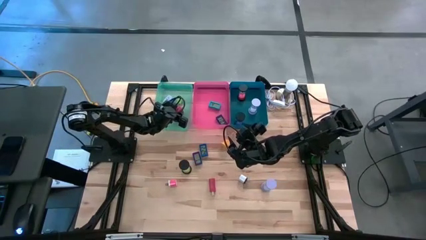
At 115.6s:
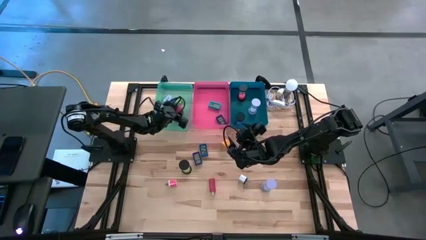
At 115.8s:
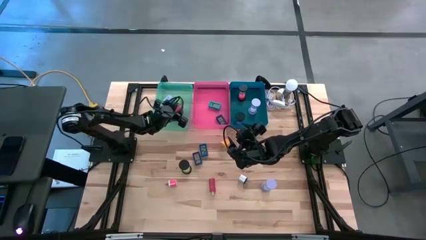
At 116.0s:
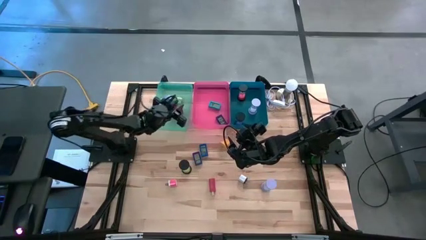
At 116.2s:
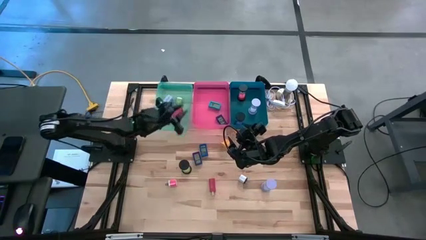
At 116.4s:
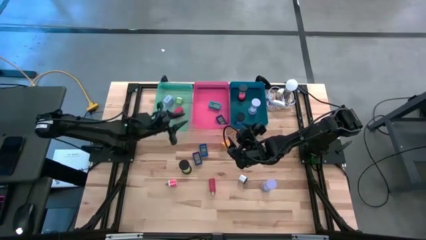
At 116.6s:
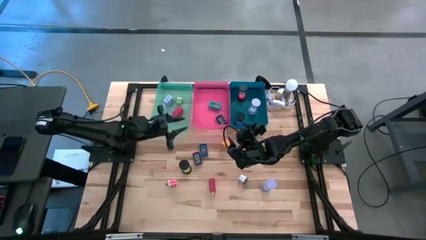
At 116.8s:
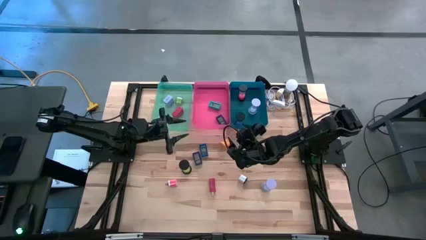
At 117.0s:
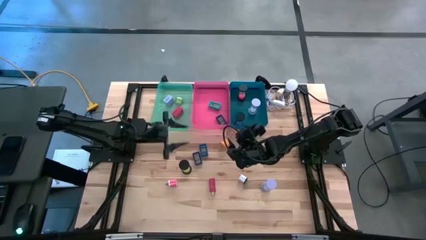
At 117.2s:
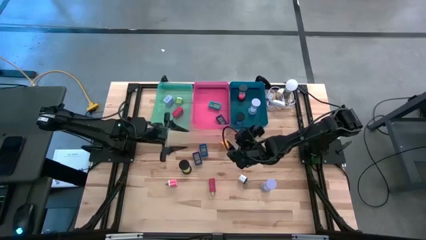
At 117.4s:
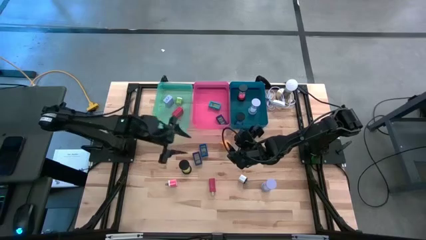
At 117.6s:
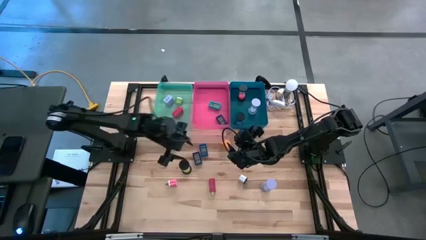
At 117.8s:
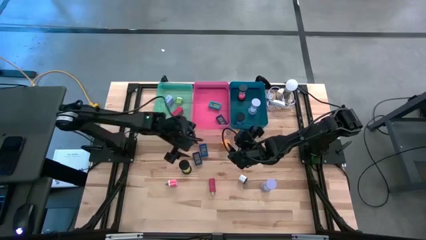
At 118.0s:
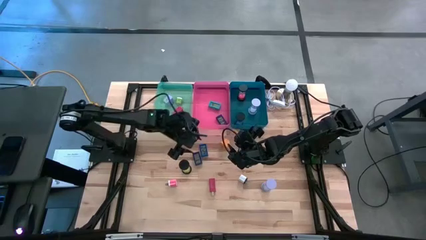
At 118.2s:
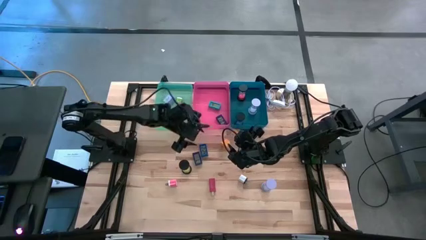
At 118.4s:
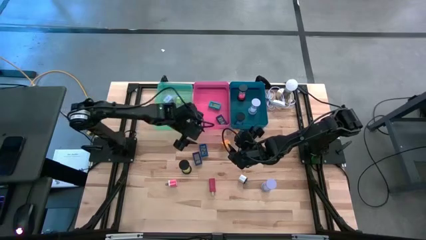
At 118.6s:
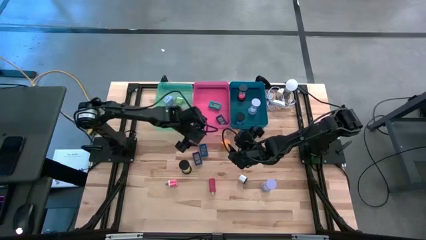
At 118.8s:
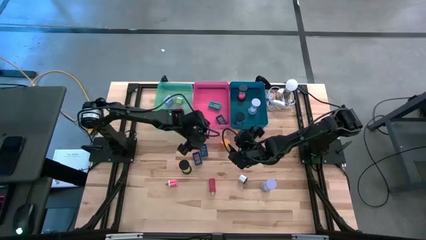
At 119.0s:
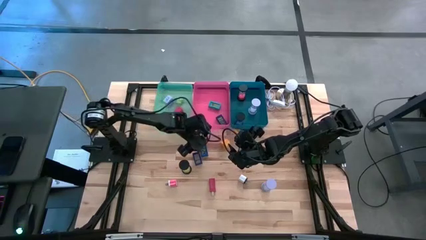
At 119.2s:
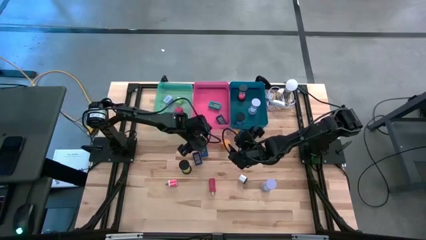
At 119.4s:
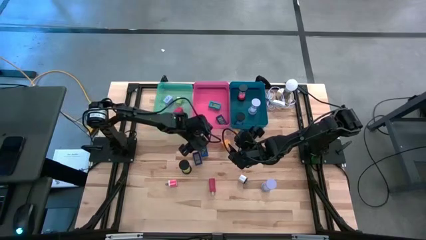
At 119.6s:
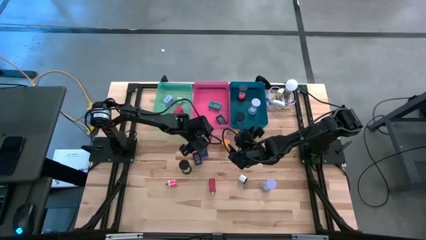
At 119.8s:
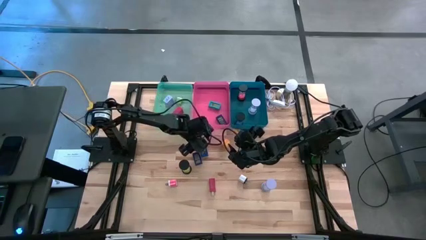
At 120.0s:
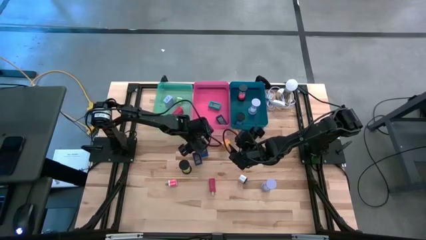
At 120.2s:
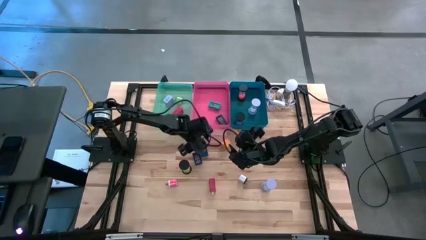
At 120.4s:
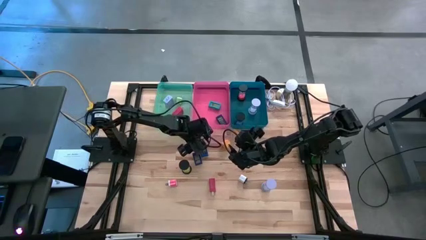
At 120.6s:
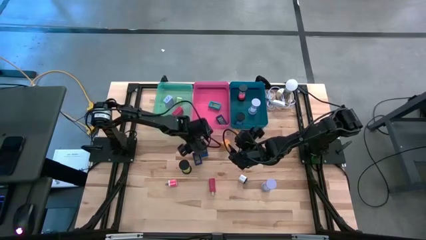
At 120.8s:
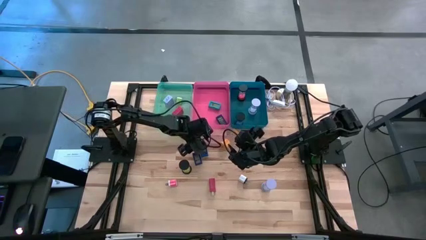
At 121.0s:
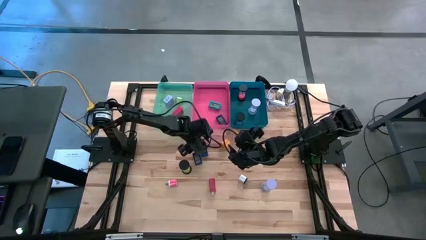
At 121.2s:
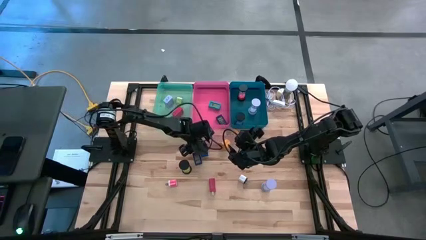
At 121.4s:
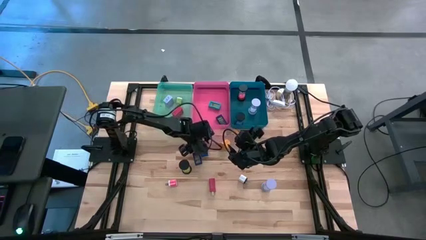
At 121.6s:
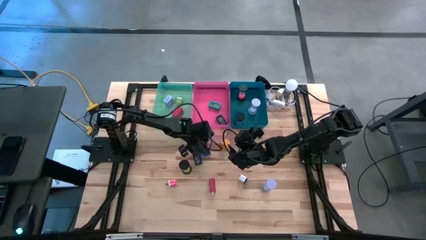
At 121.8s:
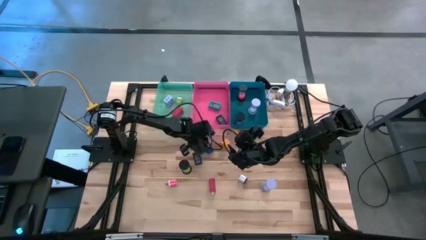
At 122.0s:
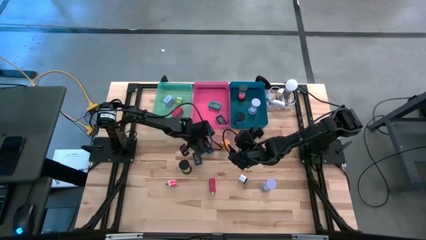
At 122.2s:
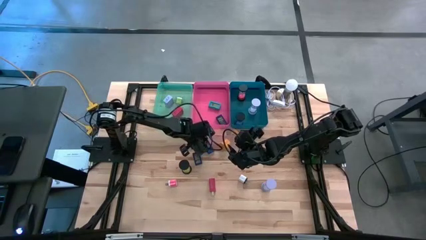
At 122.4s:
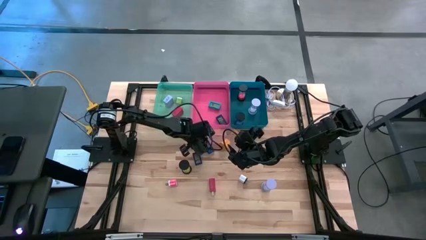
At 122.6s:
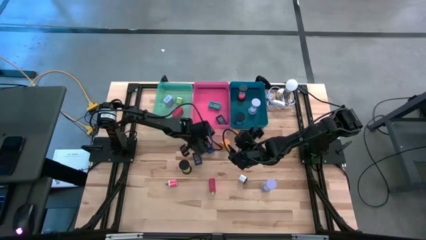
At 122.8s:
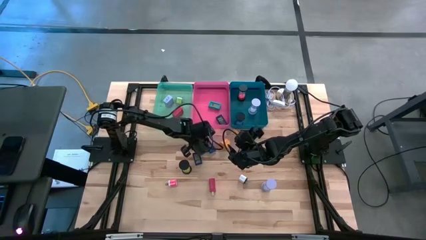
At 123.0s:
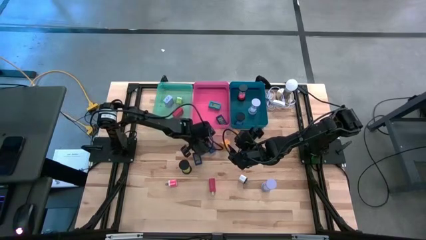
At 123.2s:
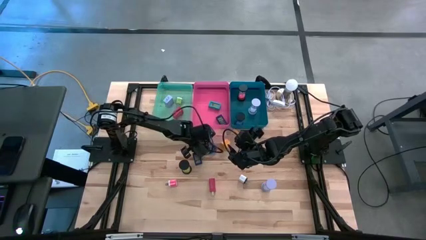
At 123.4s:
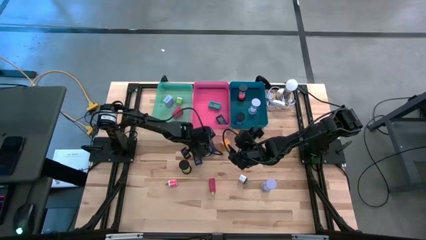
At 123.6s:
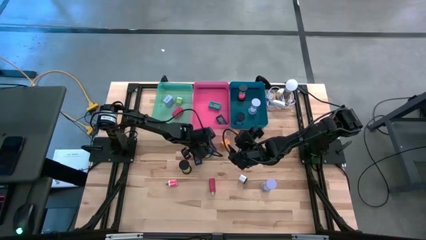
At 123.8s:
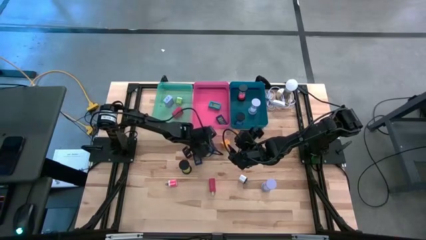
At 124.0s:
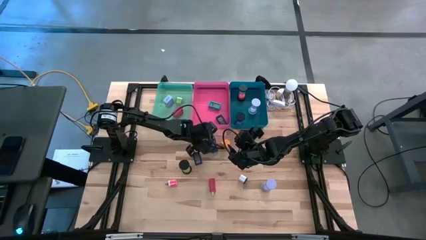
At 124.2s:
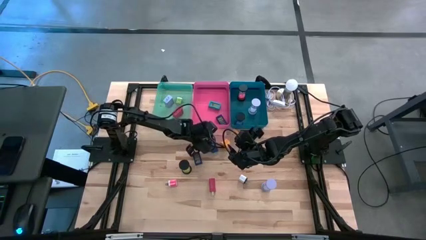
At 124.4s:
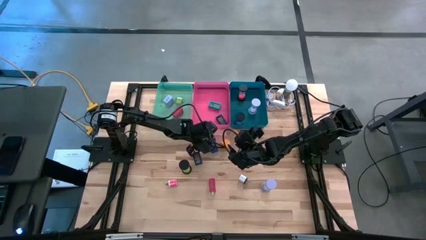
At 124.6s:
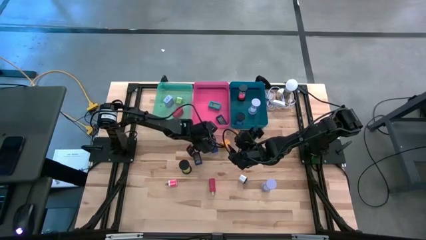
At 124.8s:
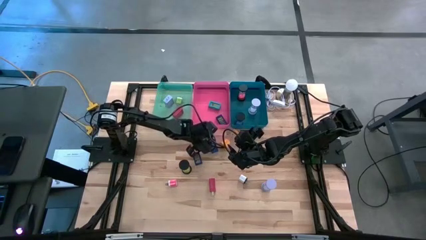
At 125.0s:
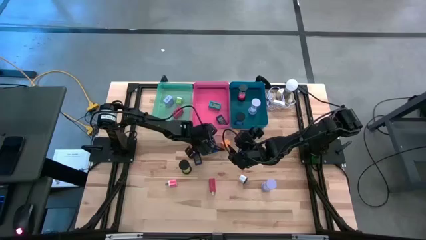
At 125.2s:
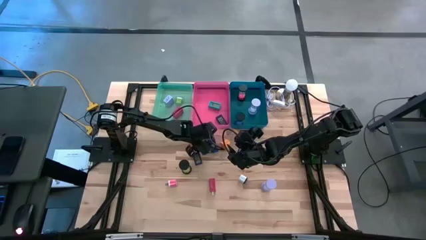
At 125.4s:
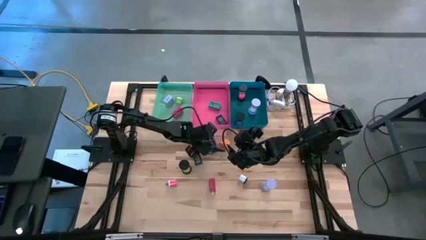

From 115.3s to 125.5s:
Task: Pick & Place Office items
Put the light blue digital clock into the pink bin

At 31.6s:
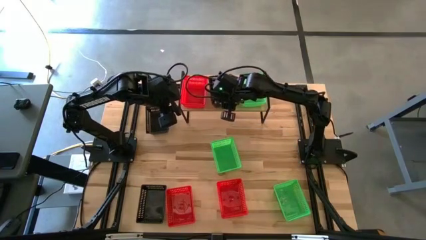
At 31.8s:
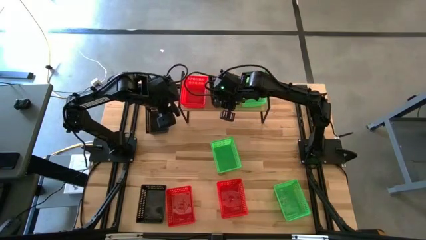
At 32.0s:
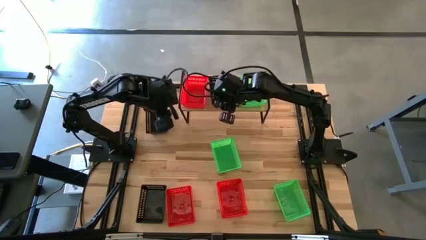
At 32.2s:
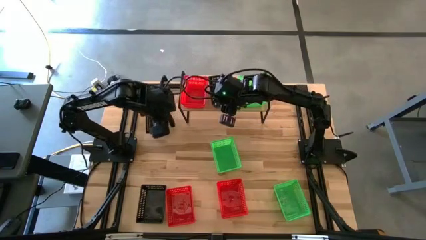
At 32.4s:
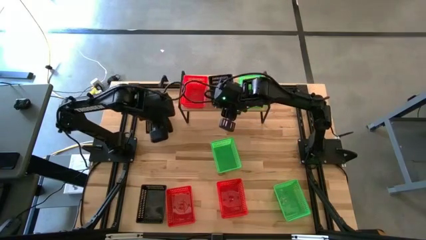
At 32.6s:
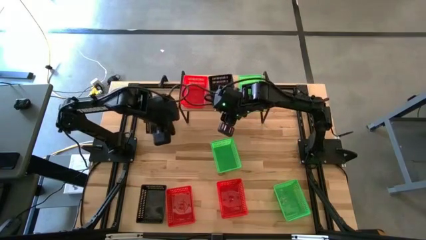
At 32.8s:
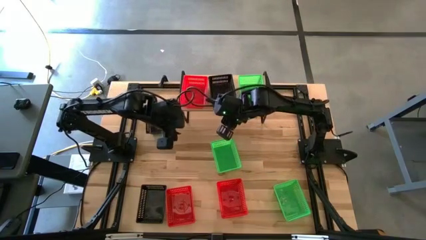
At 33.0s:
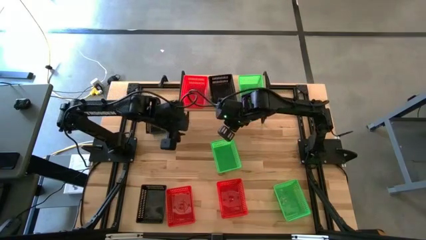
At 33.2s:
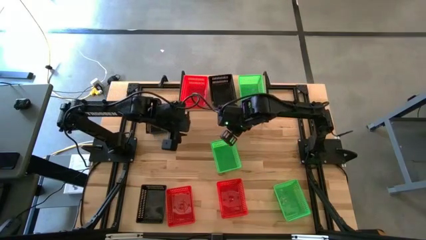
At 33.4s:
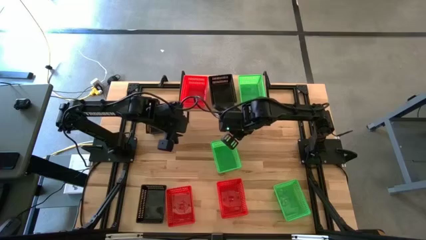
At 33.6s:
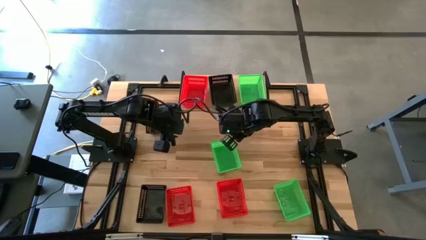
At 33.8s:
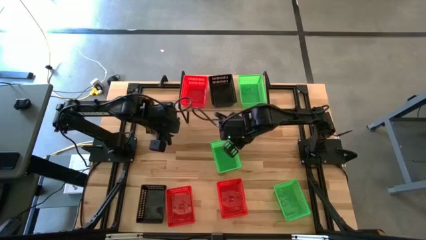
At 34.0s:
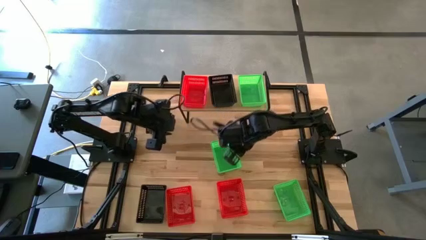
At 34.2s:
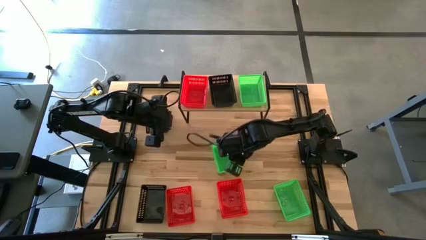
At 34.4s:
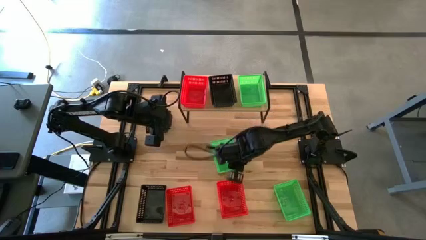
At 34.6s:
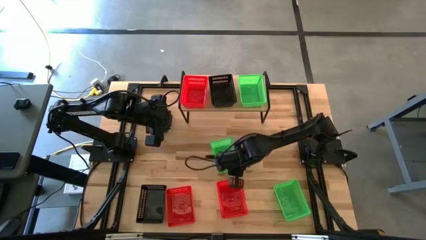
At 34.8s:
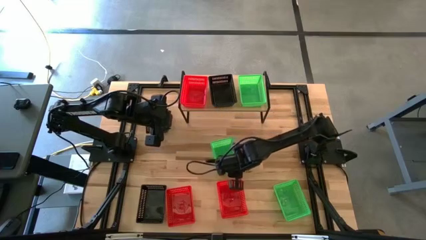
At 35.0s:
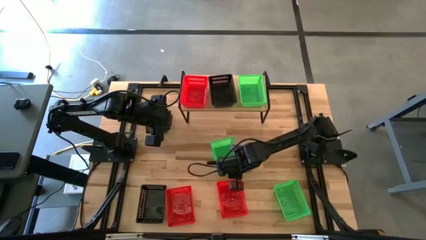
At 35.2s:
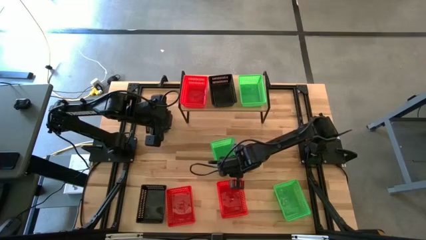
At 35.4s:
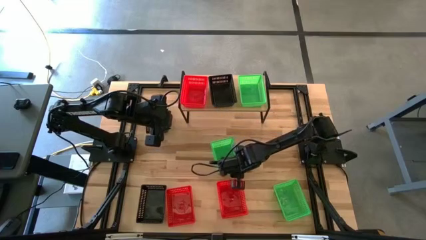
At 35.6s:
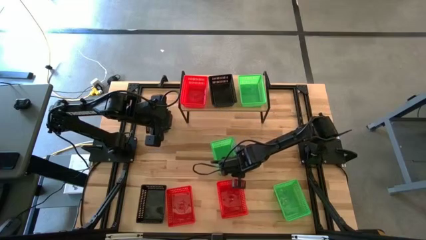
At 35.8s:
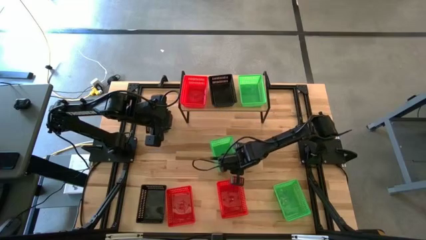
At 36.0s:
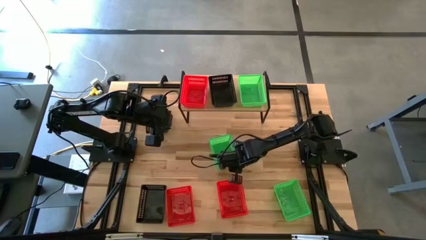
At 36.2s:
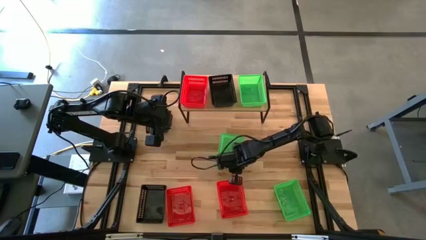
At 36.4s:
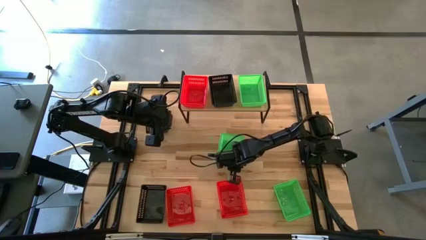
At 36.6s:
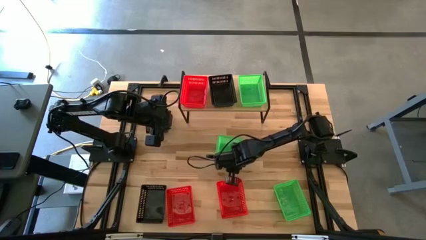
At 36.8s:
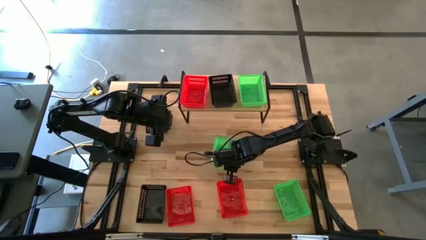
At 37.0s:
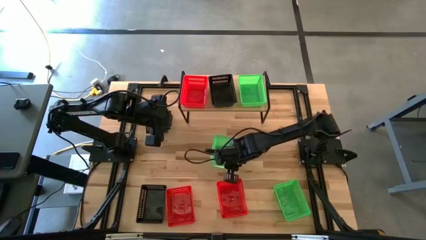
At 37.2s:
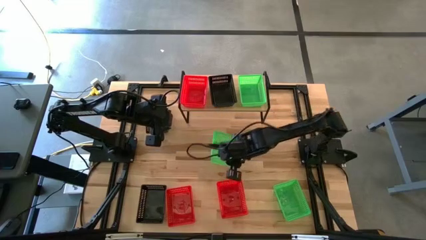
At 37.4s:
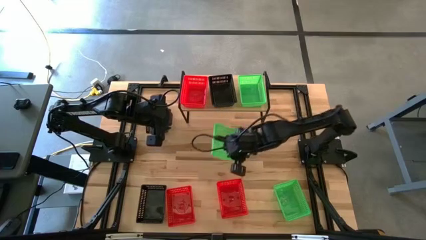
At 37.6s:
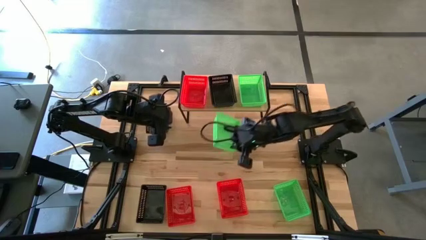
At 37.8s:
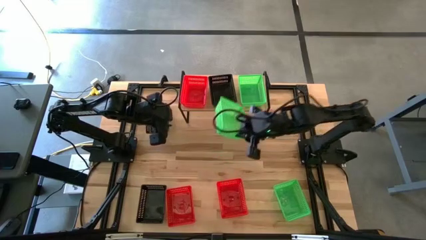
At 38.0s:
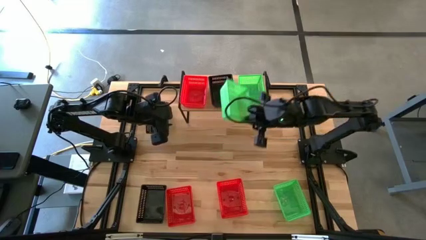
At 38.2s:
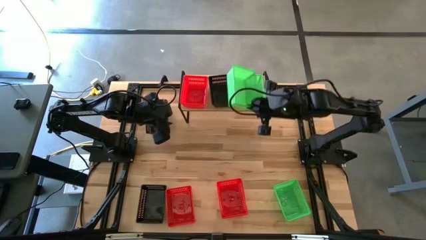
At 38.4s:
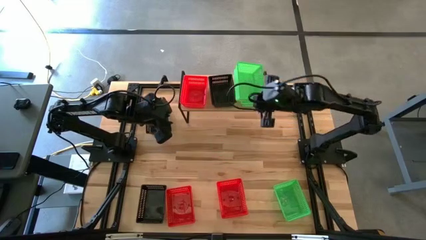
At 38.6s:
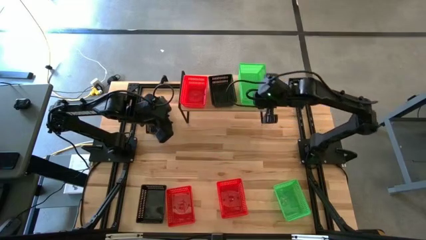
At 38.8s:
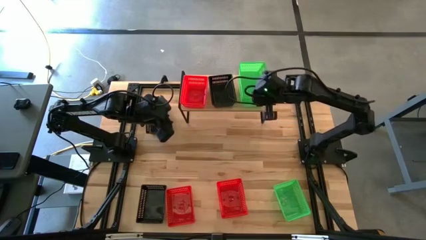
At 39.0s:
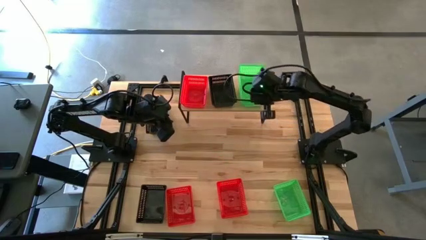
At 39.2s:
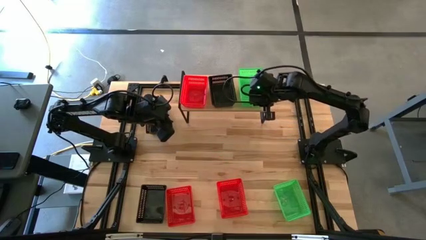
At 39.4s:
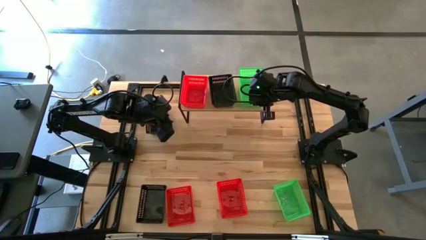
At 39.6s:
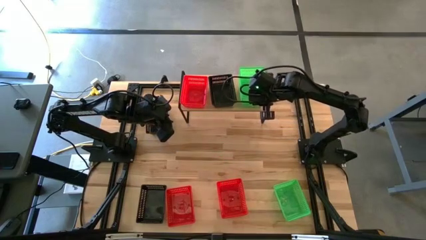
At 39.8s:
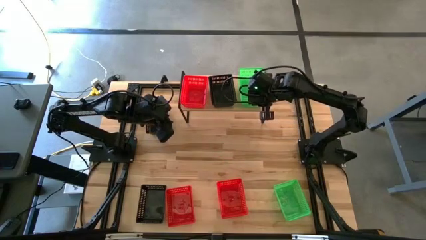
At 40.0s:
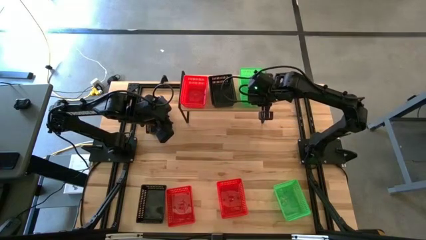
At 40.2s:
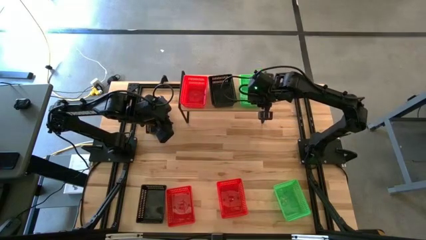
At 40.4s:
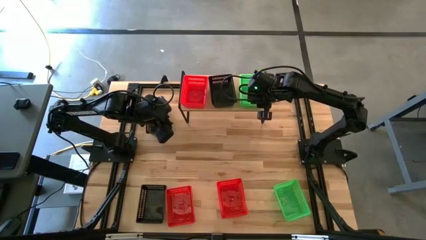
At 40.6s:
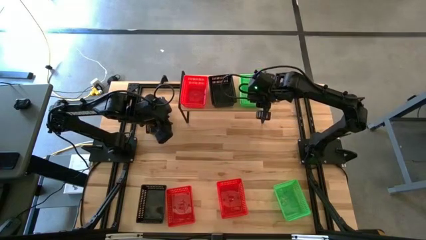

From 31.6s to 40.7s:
Task: Stack baskets on shelf by color
Stack the top green bin on the green bin on the shelf
